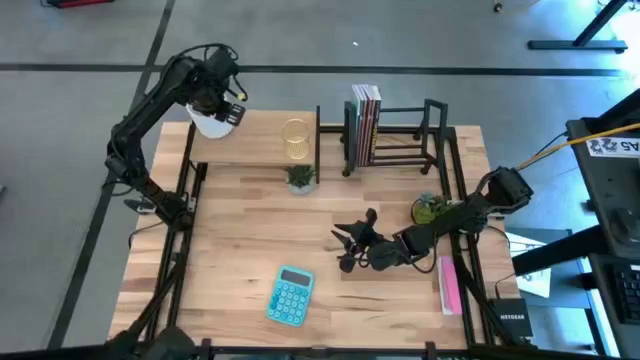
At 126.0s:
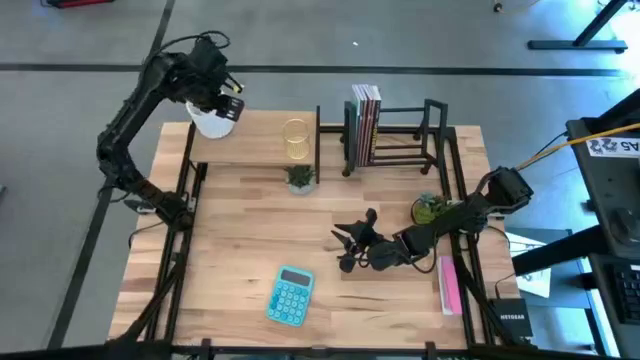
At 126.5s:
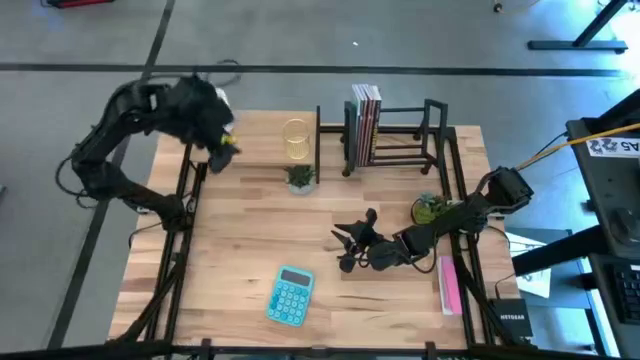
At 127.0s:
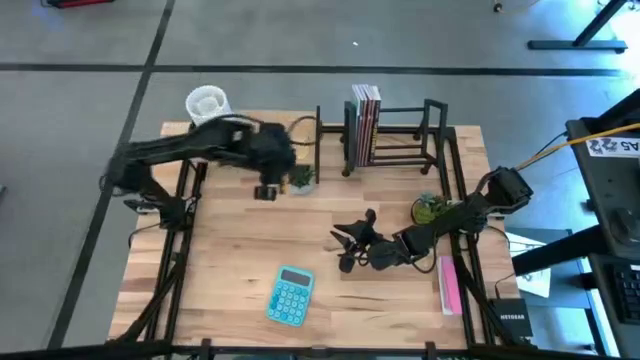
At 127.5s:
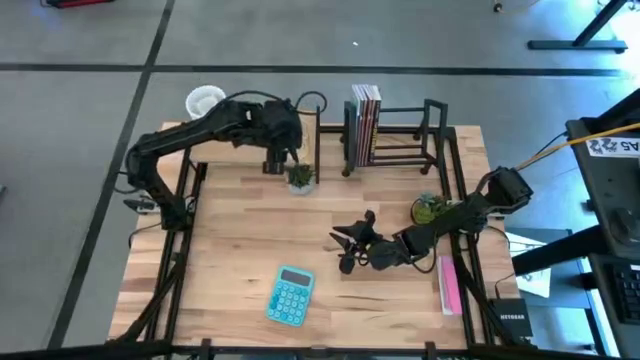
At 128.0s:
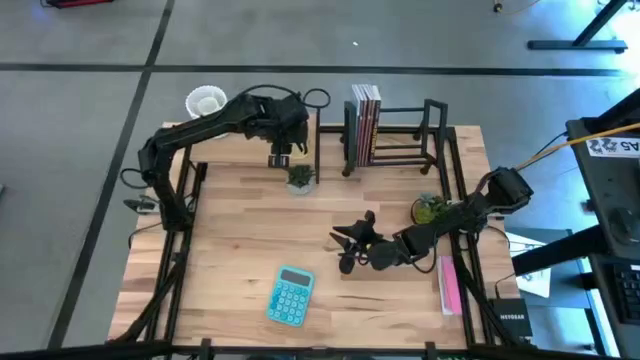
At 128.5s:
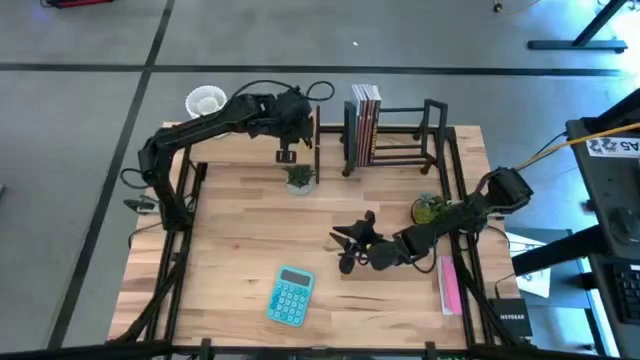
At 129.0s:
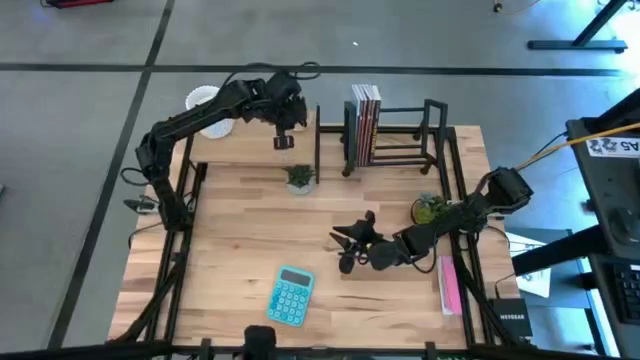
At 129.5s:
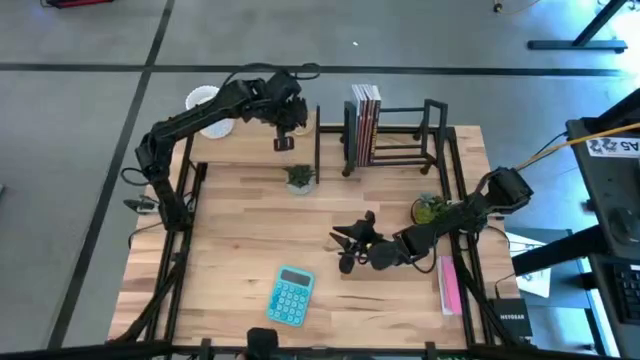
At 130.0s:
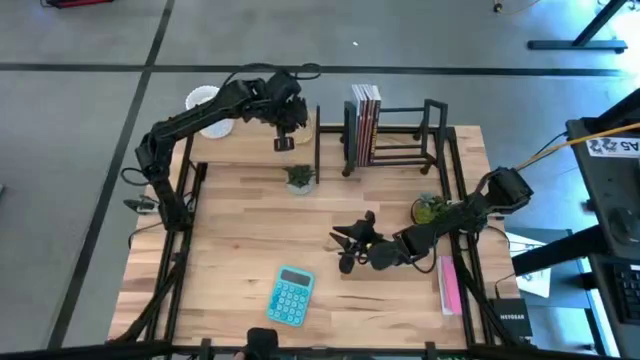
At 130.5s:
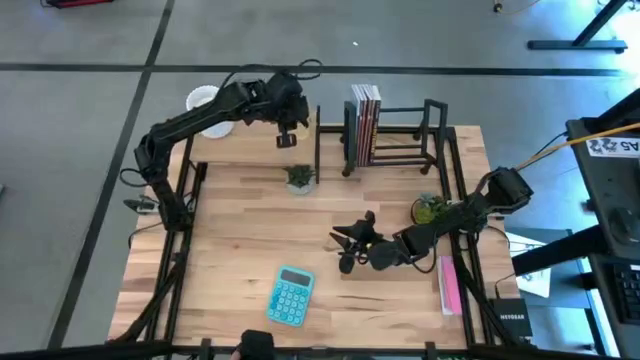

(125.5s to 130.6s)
Task: Stock shelves
Adjust the gold pen holder on the shelf

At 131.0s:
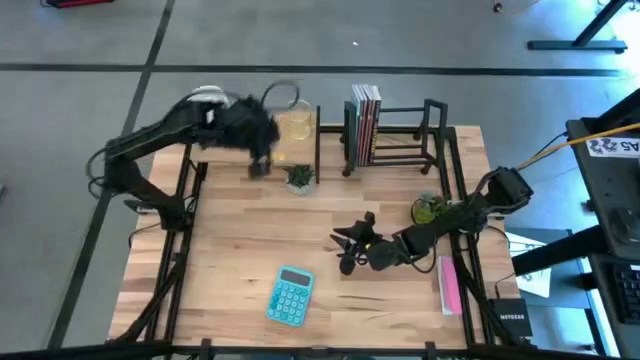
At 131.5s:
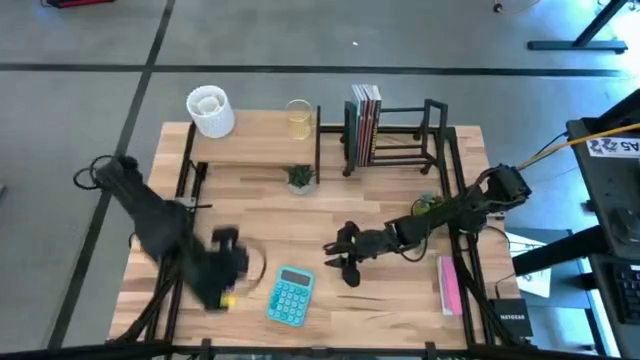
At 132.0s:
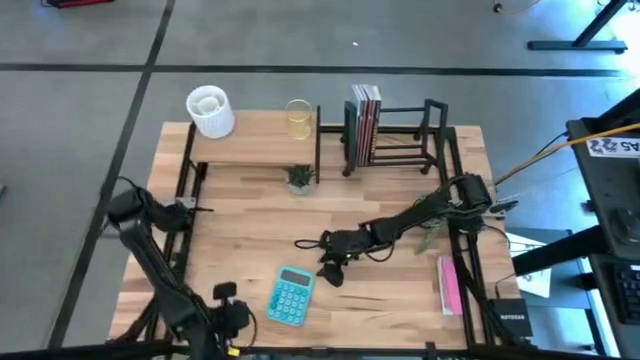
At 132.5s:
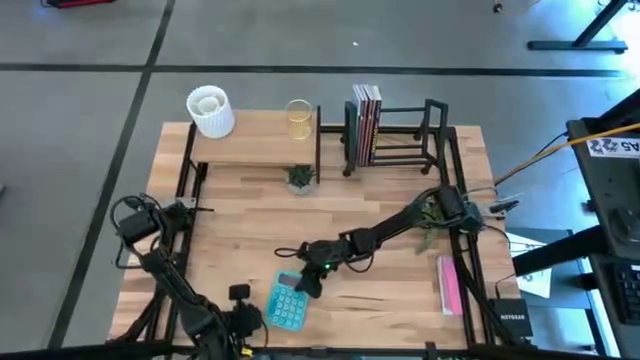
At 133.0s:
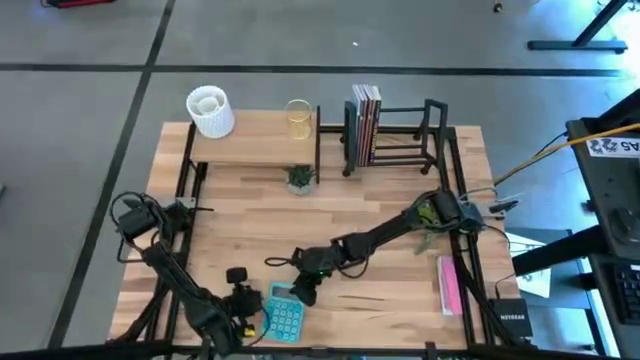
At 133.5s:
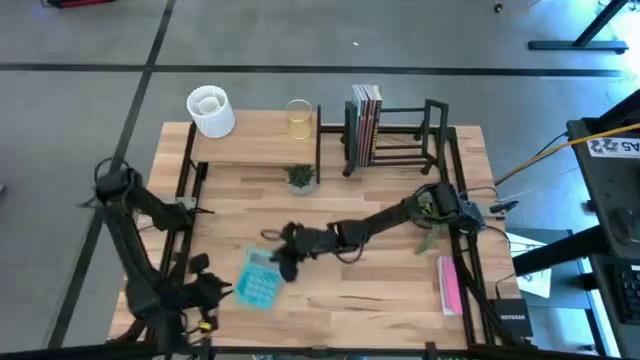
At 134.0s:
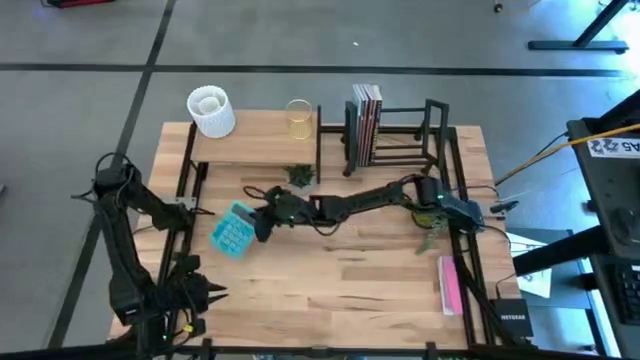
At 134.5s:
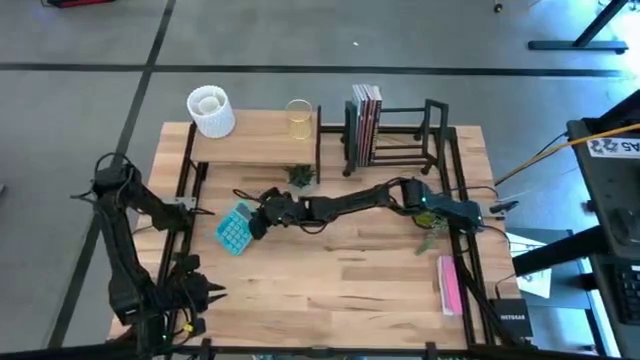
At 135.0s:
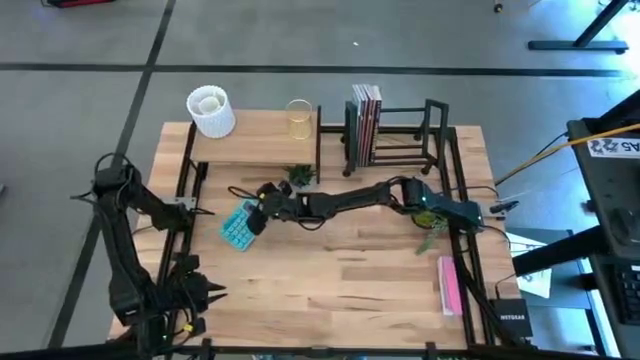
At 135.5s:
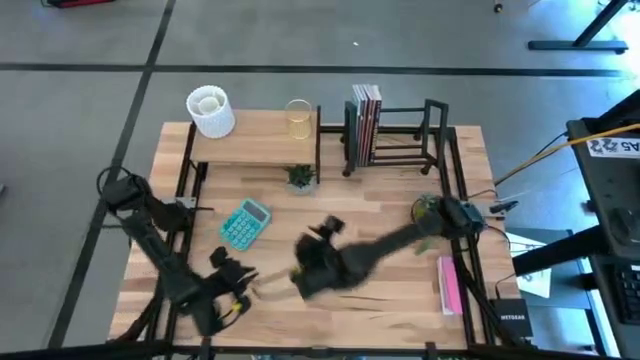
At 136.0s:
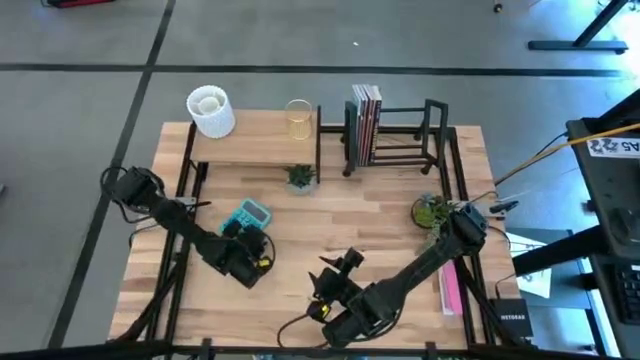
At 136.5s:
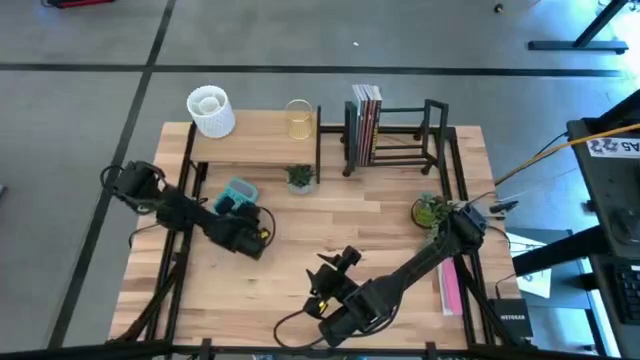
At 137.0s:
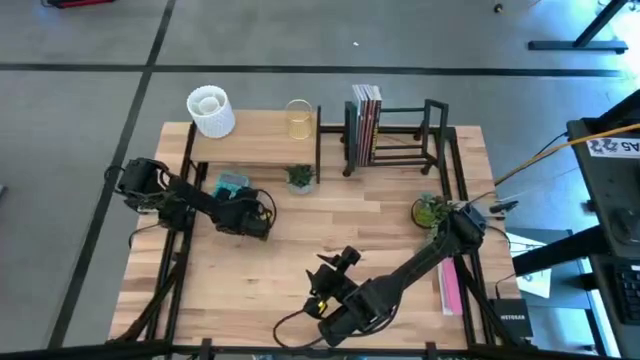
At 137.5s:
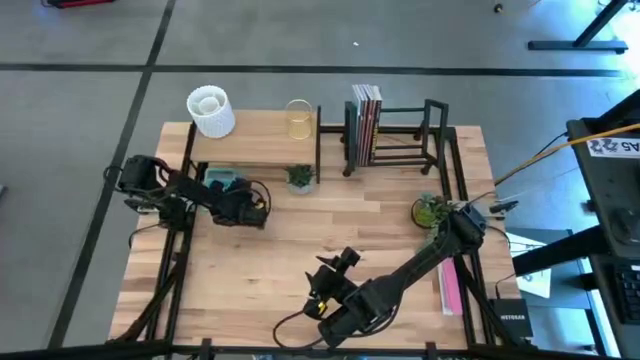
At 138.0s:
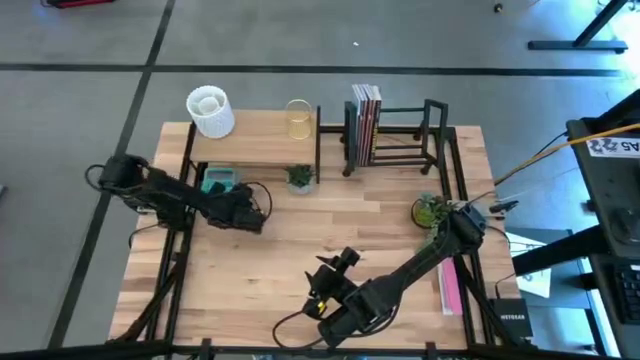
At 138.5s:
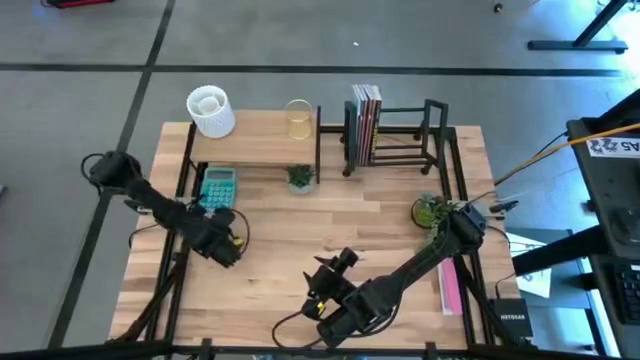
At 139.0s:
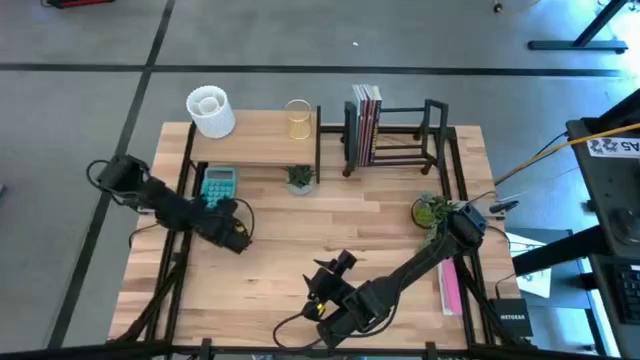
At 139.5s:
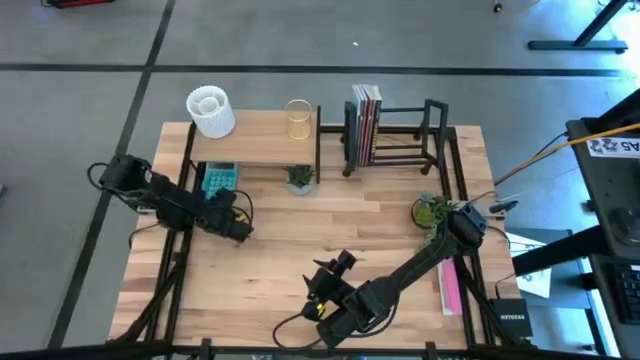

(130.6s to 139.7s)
Put the blue calculator under the shelf

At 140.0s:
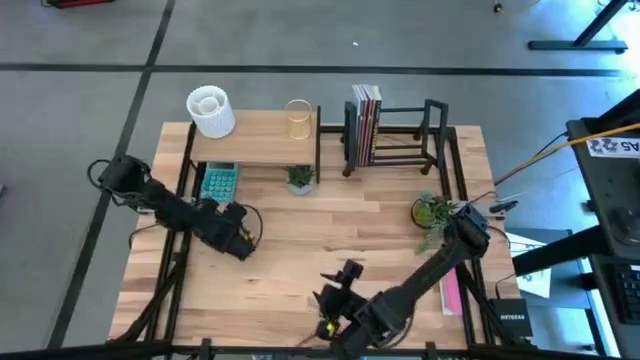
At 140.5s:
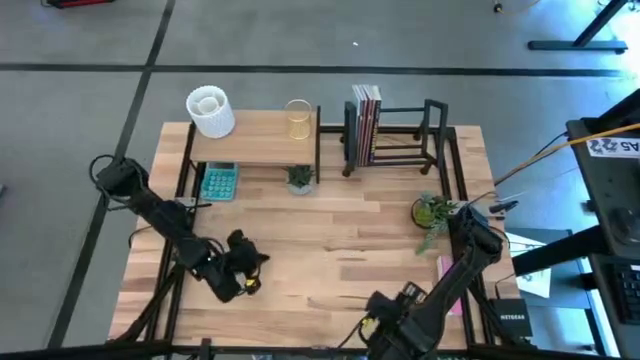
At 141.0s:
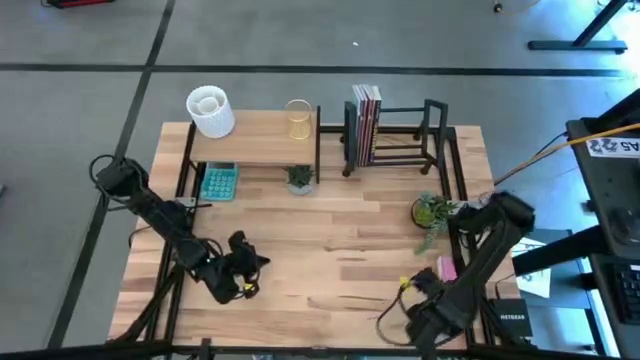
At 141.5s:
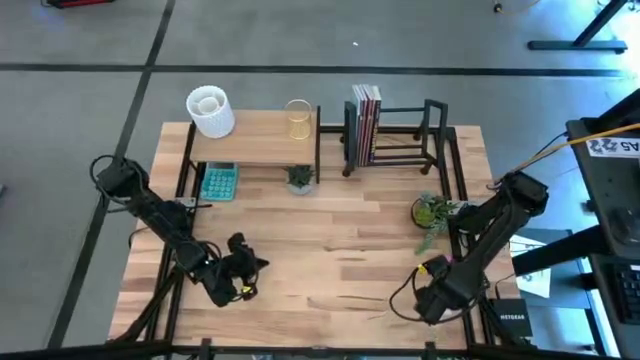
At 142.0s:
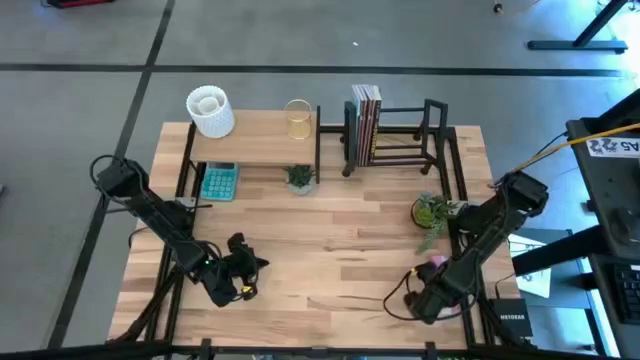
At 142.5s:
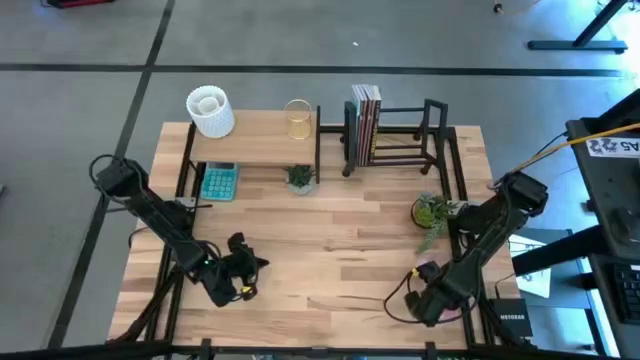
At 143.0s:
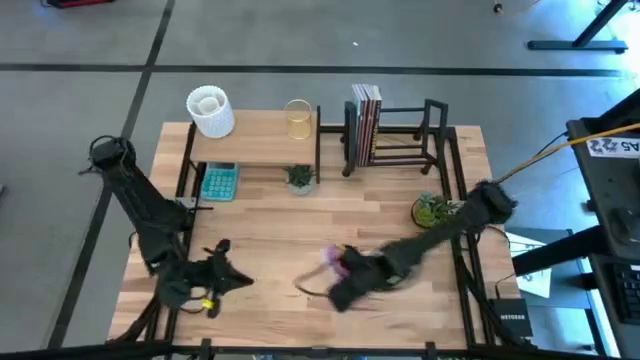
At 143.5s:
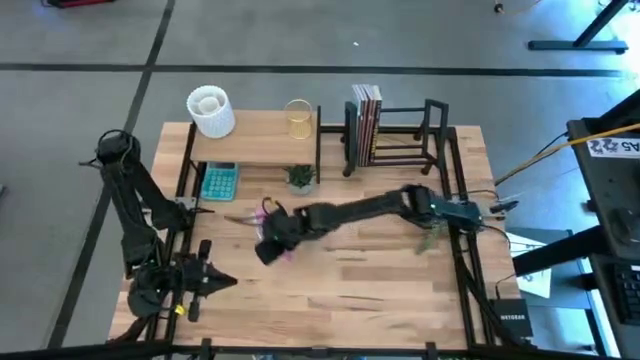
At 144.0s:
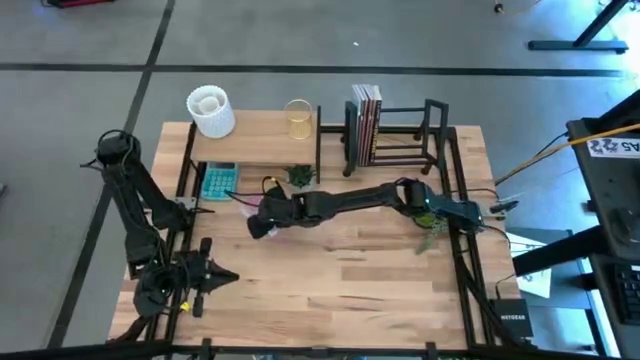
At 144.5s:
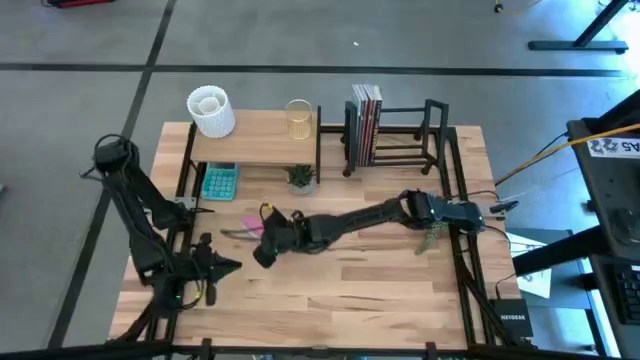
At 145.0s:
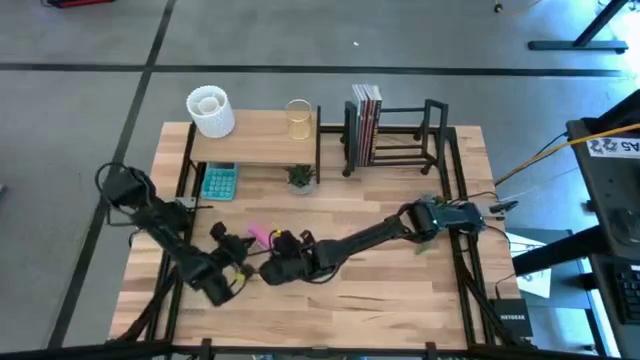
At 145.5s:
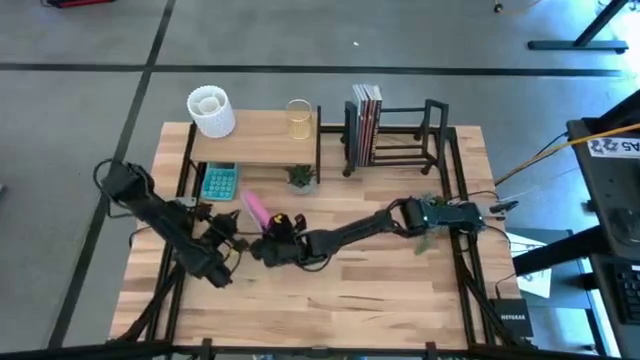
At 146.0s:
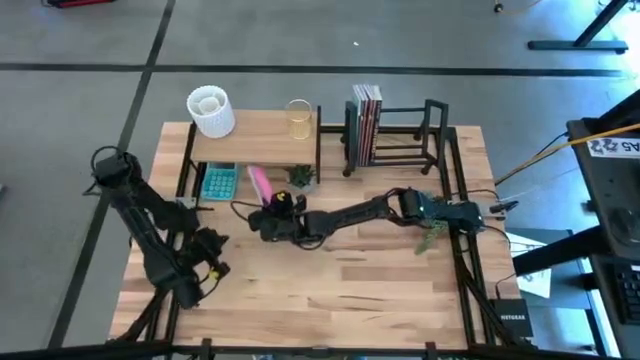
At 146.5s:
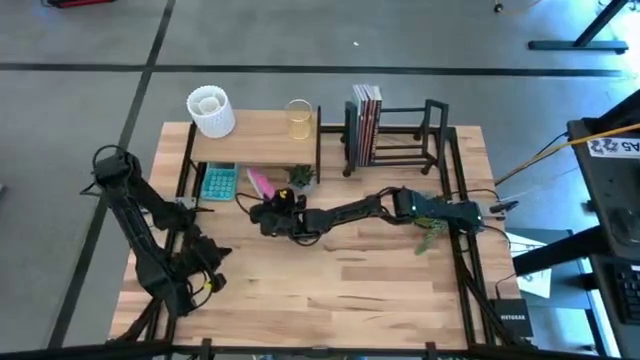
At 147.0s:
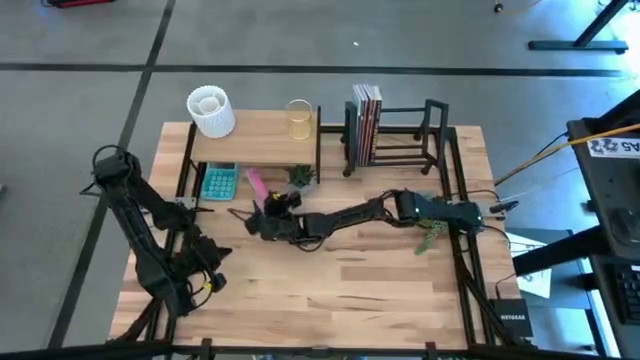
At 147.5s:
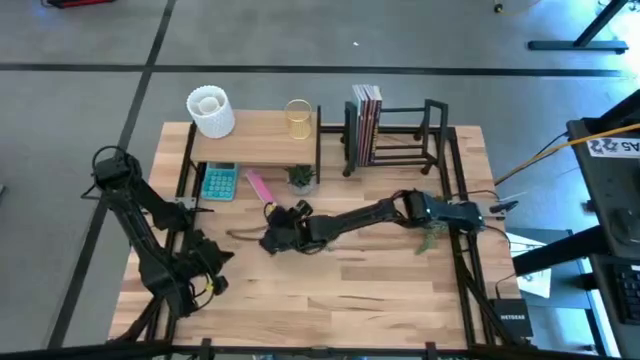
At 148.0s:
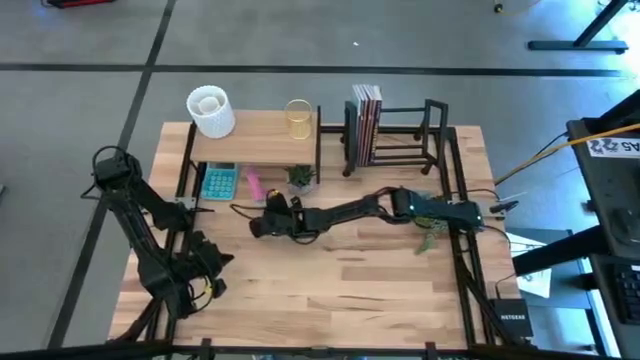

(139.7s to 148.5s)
Put the pink stapler under the shelf
